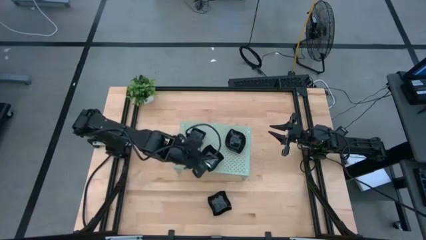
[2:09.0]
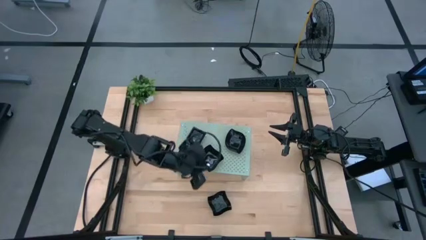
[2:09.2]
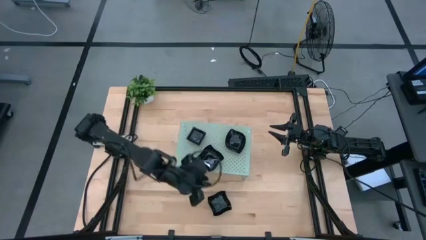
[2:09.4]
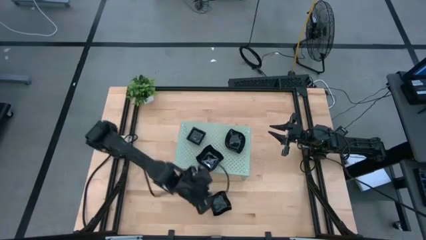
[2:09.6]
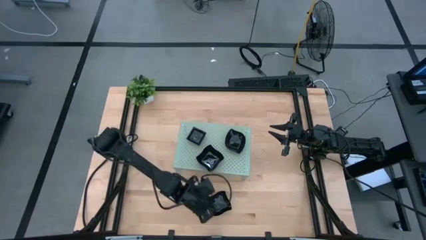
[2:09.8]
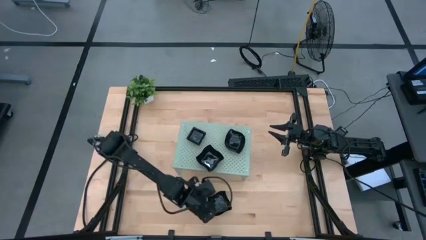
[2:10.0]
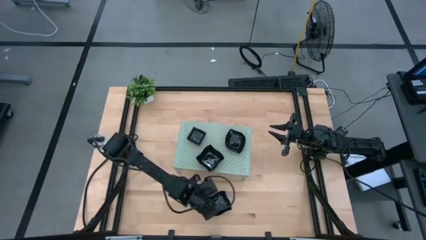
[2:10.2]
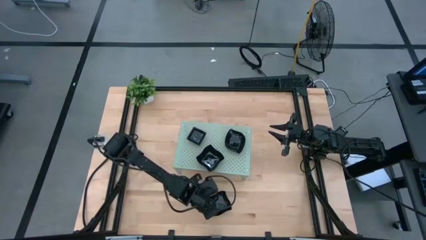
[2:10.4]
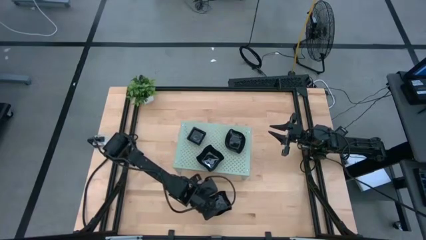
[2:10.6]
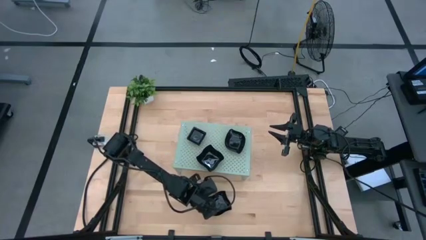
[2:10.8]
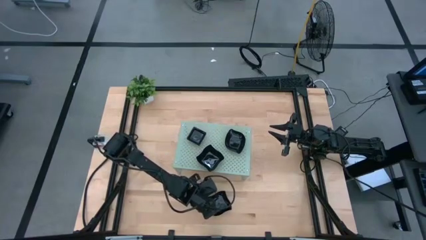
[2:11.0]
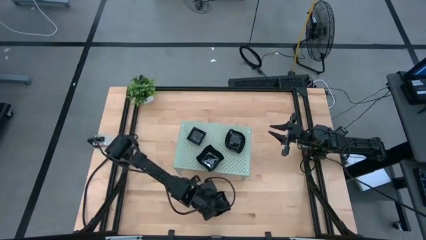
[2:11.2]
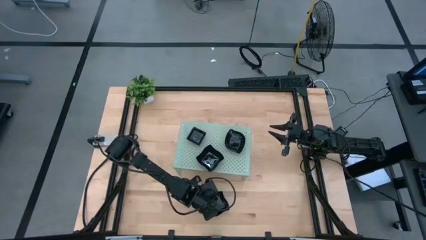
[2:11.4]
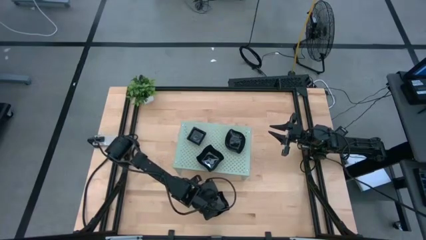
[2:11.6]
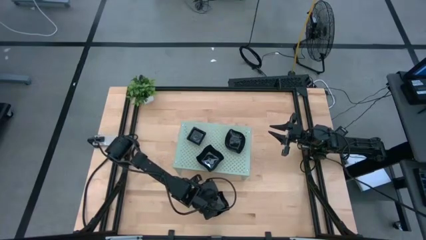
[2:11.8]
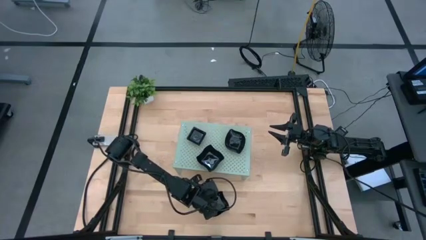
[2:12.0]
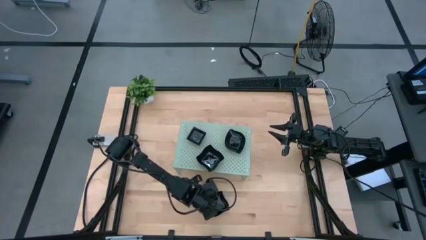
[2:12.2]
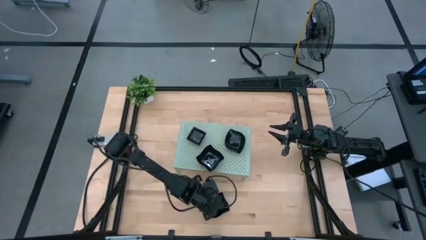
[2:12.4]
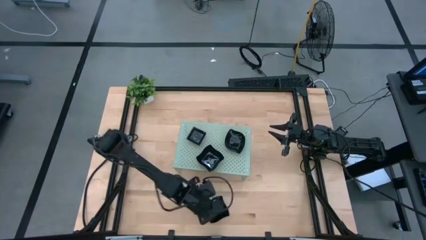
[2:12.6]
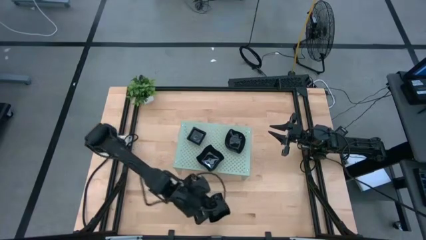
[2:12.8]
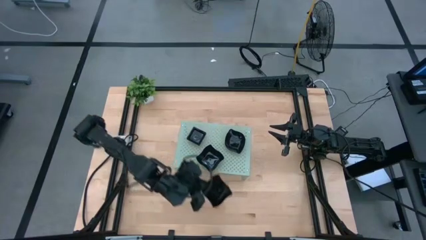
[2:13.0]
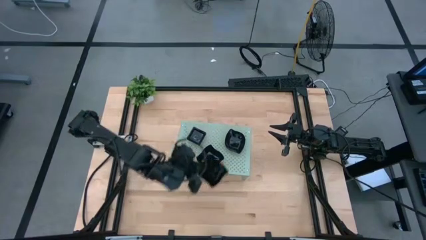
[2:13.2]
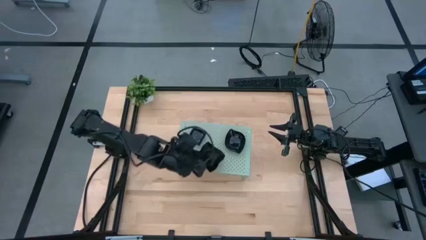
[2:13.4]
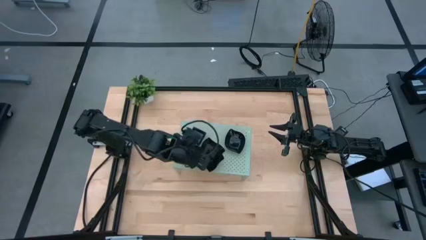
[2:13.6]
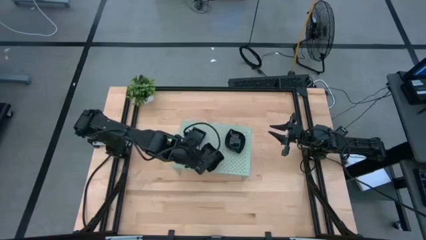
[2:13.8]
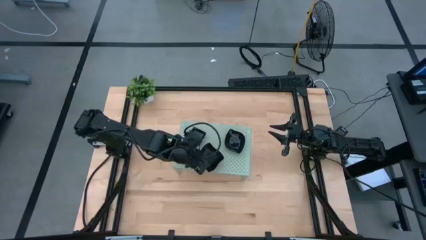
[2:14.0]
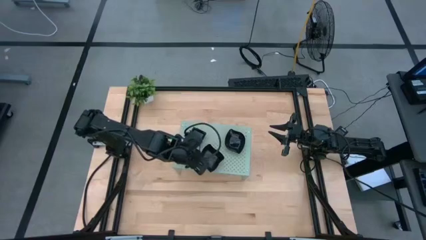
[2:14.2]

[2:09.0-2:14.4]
Task: Pick & Place Mini shaped plates
Stack the distorted square plate on top of the distorted square plate on the shelf

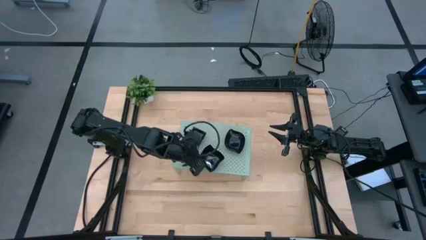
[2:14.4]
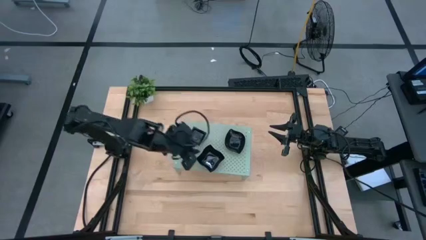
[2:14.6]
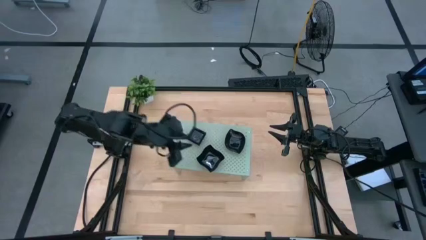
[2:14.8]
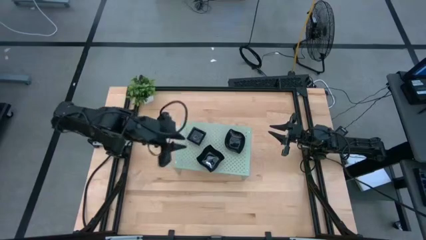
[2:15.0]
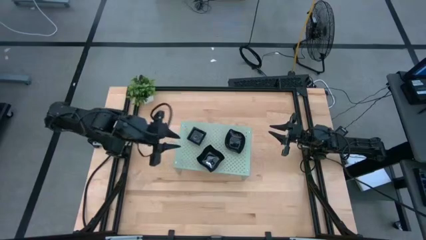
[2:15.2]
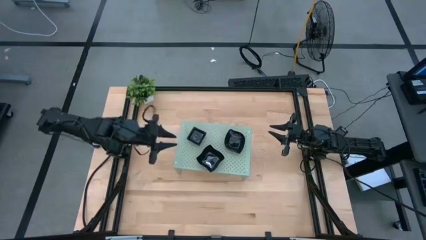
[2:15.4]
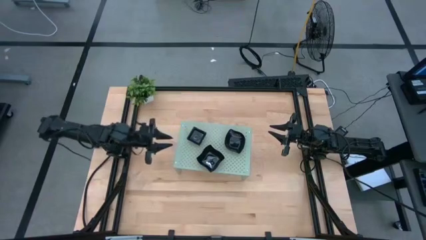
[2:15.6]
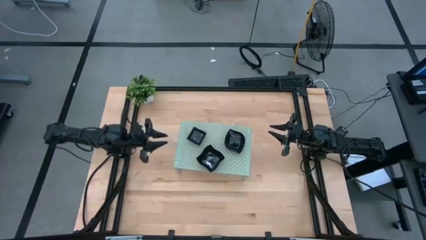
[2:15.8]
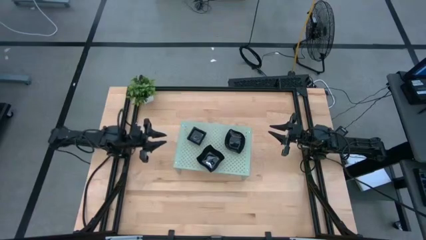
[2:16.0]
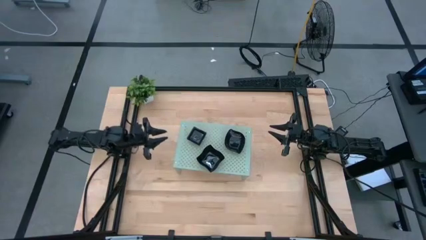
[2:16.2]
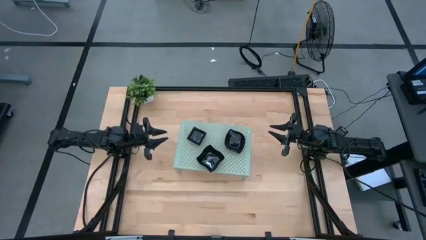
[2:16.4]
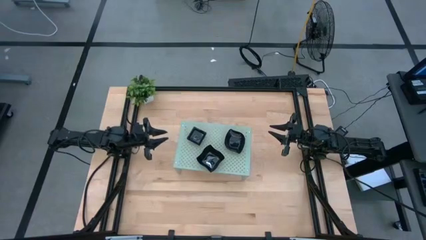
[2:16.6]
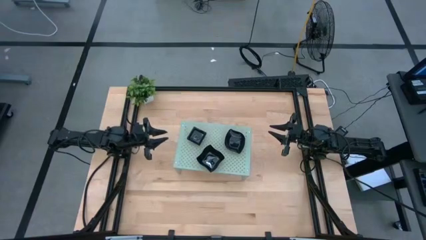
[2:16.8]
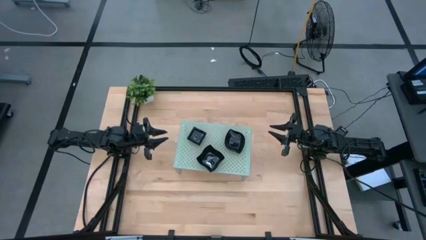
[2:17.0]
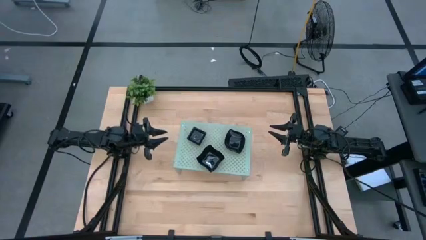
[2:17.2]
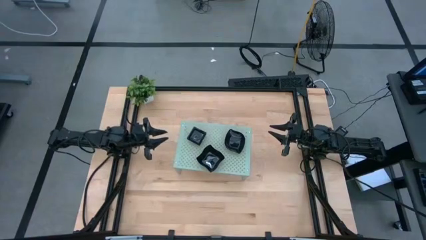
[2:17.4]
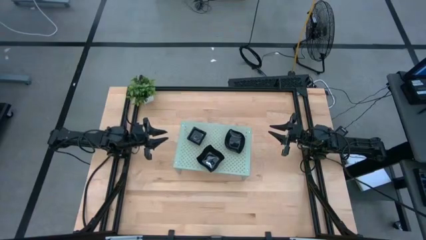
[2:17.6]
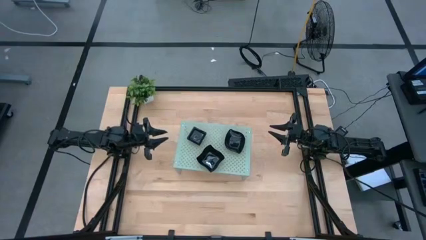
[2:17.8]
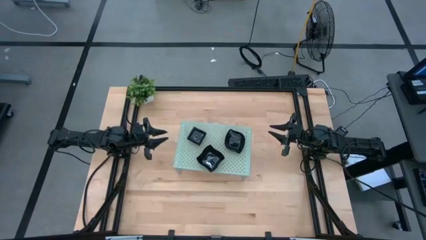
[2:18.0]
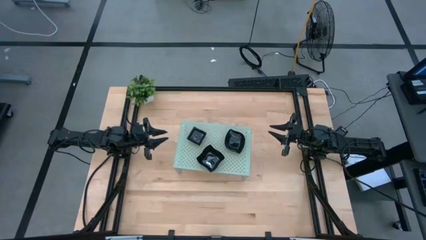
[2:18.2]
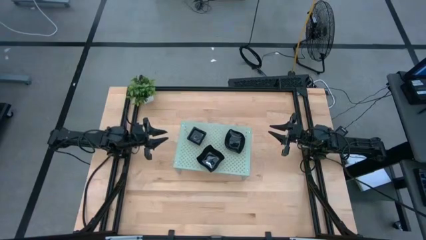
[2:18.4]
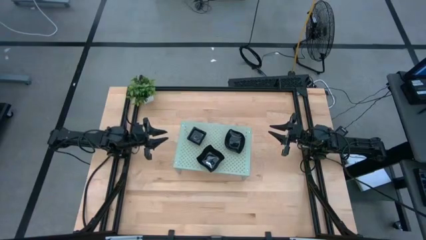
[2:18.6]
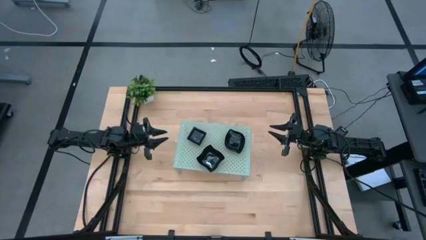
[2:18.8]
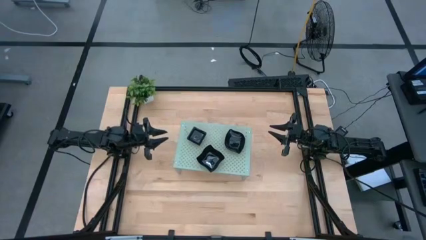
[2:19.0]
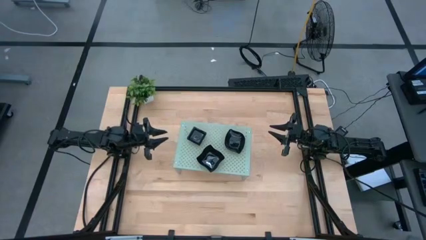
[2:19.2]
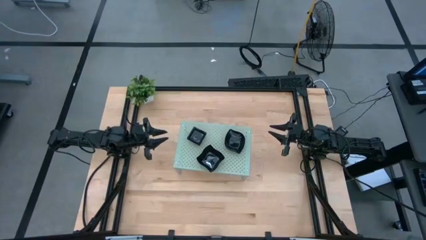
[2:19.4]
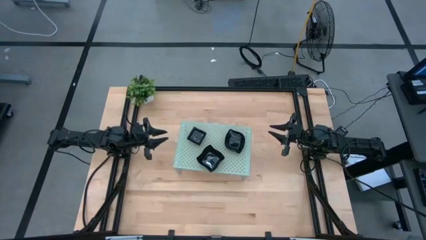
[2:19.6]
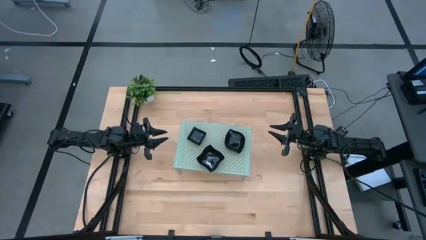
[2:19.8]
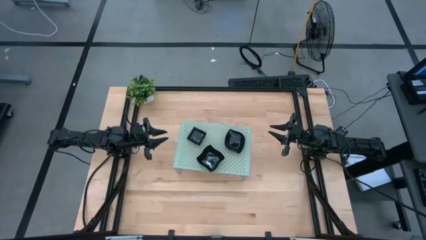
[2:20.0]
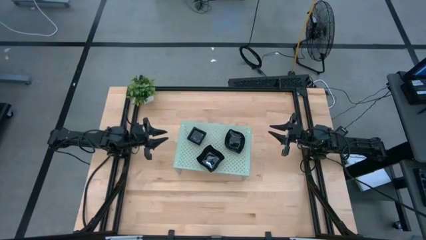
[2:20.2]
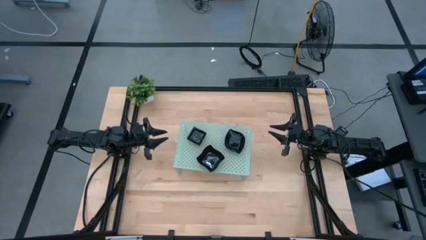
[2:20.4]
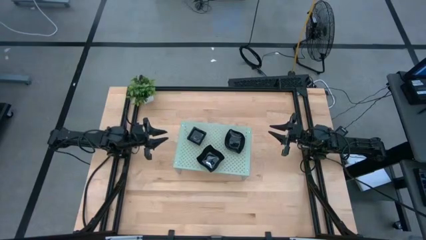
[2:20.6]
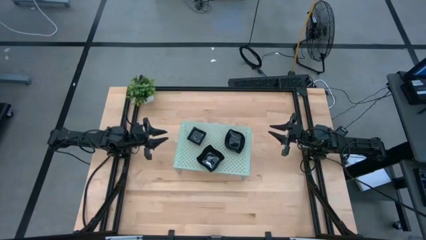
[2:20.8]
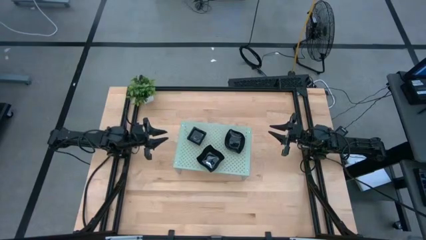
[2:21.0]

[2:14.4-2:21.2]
Return to Home Position

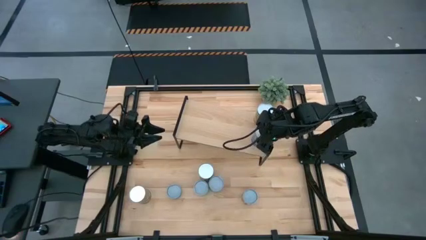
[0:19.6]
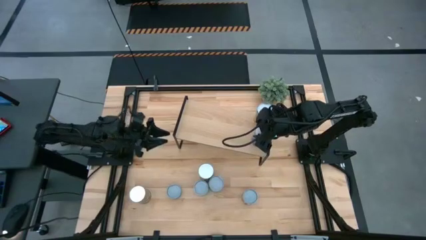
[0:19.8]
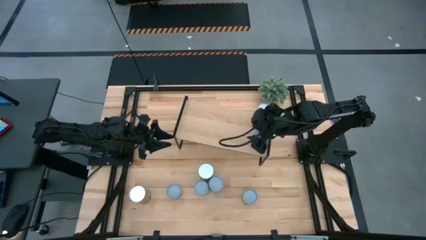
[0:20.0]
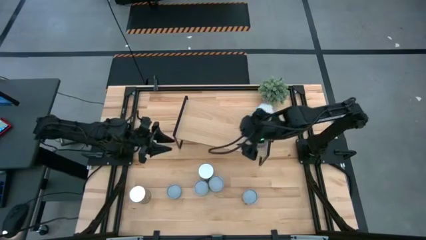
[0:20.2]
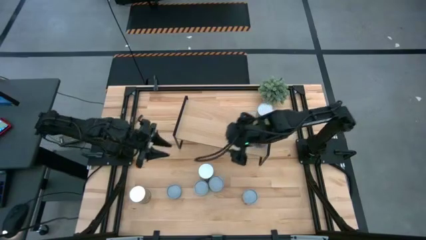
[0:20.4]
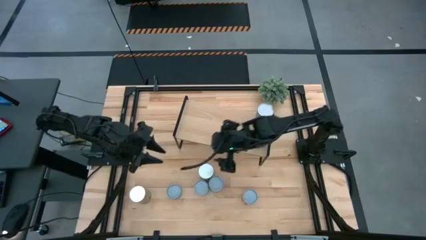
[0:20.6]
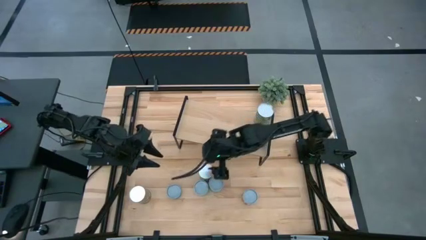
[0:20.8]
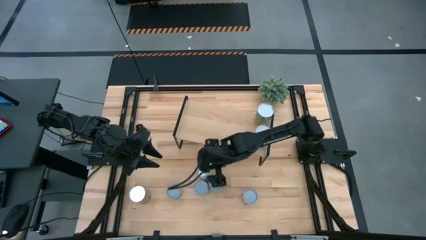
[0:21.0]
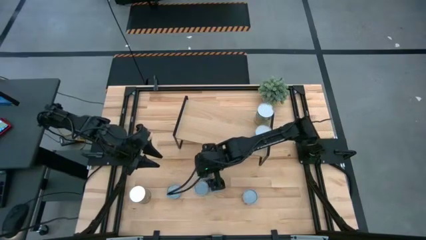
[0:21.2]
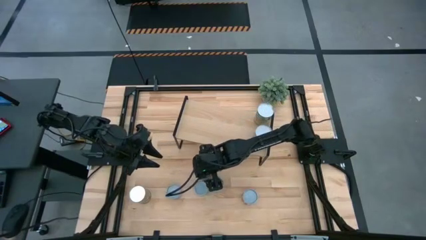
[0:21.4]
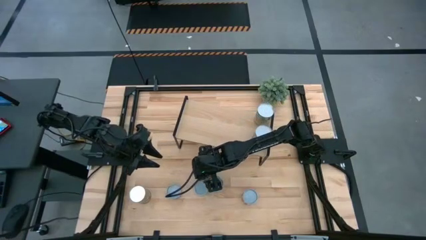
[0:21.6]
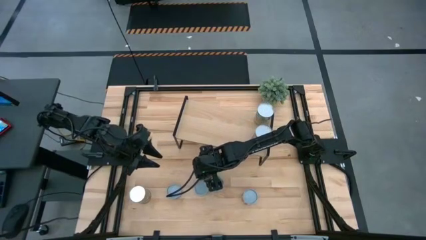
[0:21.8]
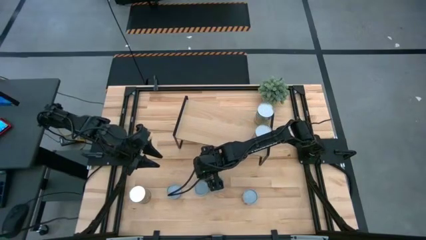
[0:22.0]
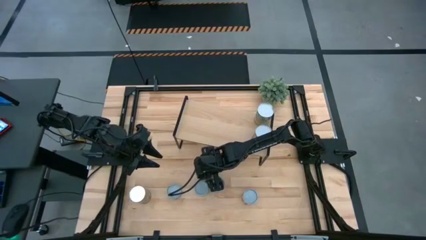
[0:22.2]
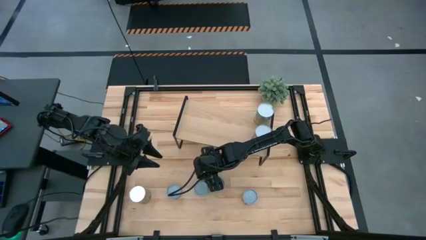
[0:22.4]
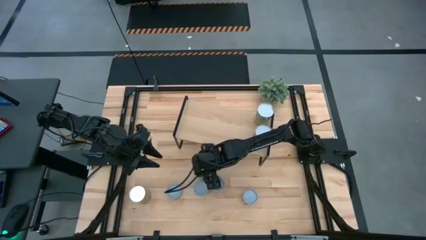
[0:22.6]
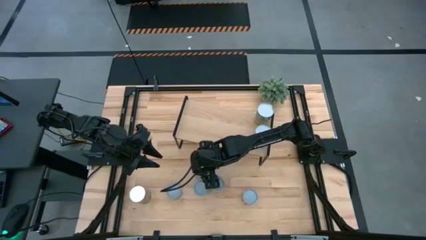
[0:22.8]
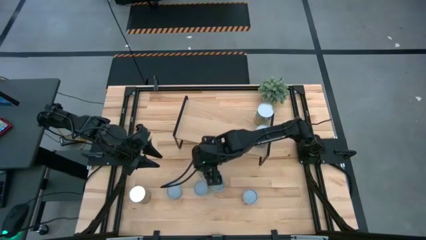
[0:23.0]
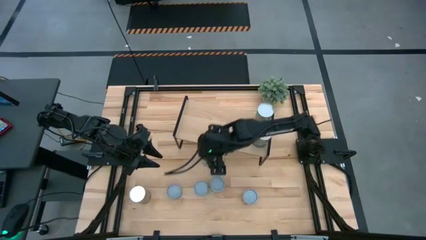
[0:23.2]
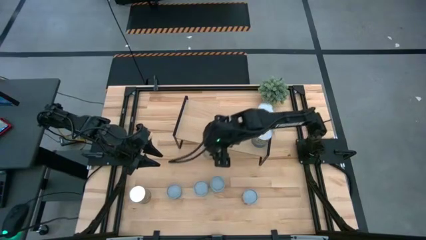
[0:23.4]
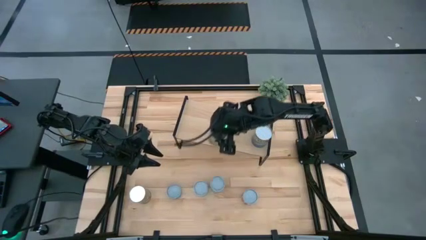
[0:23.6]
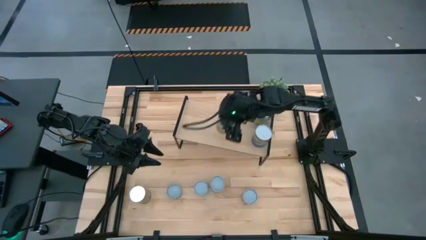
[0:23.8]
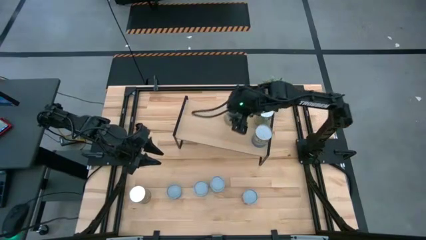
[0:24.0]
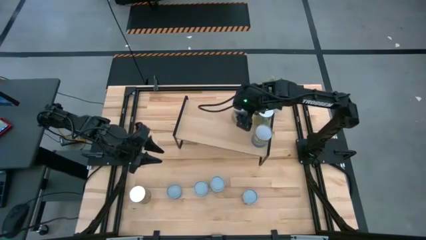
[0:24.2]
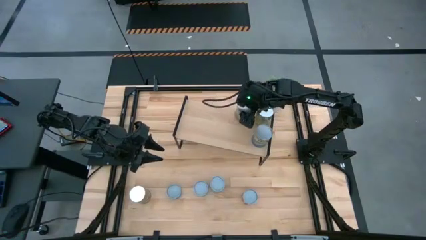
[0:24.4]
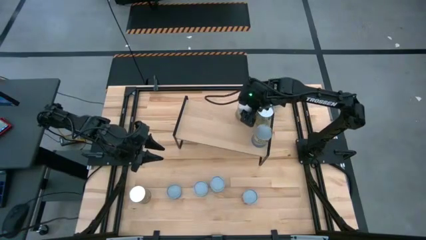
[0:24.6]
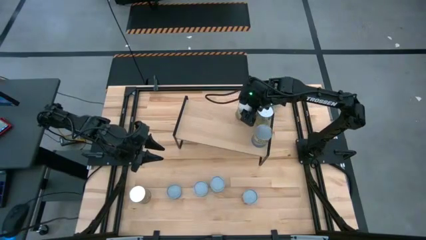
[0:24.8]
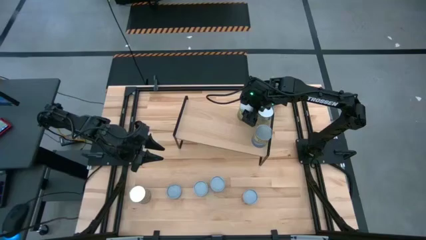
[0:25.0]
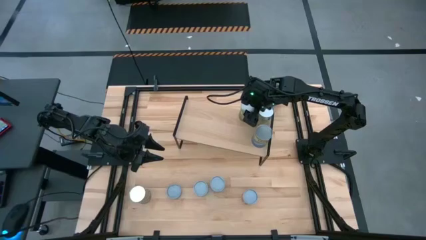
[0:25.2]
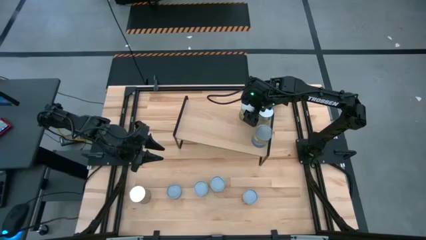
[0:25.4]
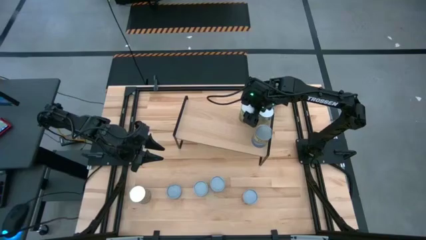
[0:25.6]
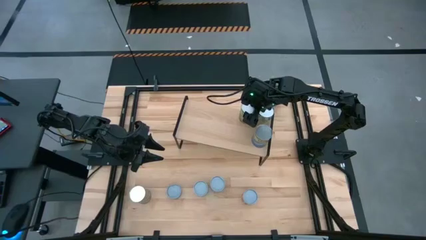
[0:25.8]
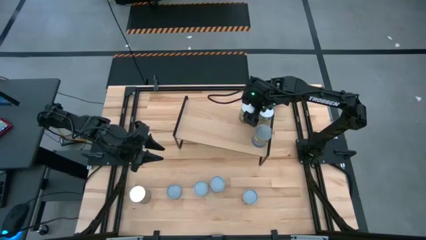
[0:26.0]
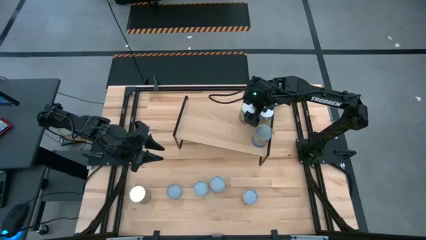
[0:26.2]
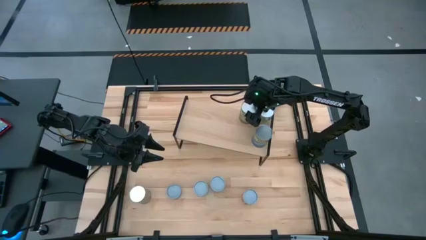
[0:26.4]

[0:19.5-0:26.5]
Task: Pick and place cans onto a shelf
Put the canned oranges on the shelf
